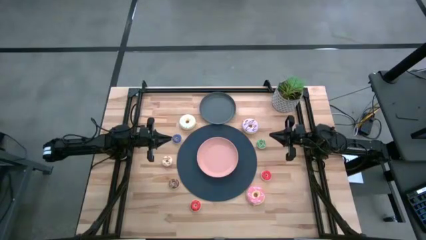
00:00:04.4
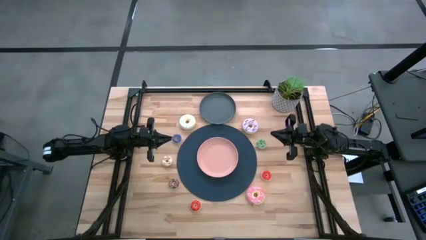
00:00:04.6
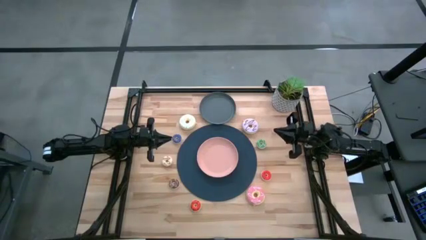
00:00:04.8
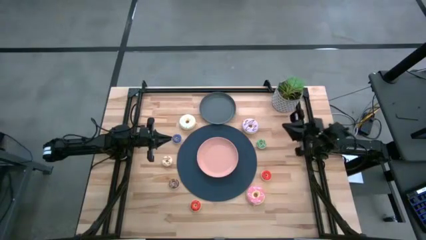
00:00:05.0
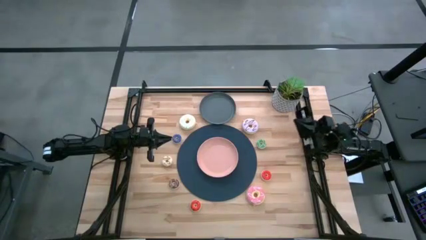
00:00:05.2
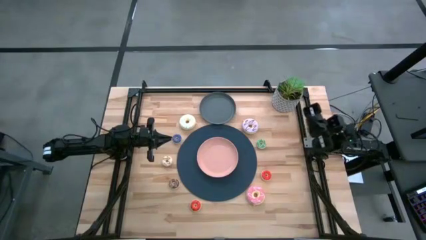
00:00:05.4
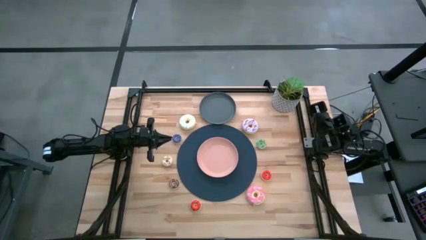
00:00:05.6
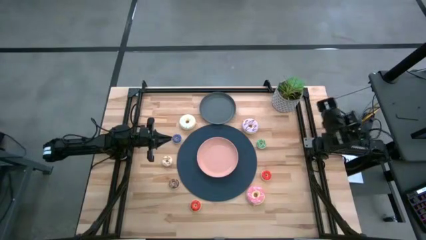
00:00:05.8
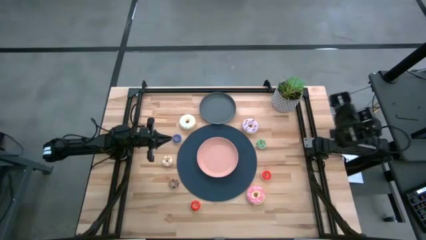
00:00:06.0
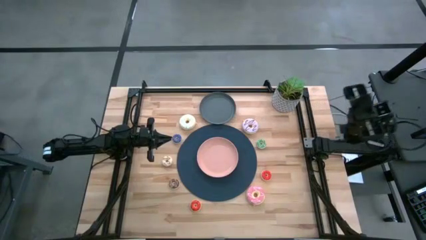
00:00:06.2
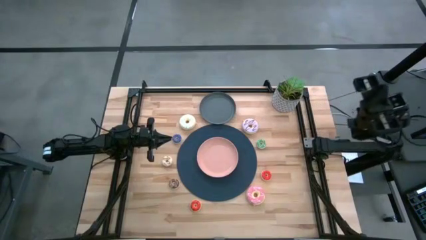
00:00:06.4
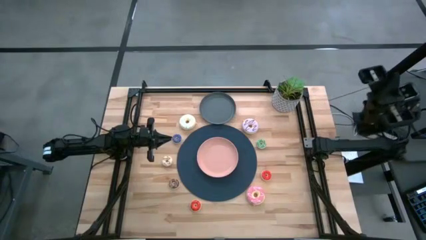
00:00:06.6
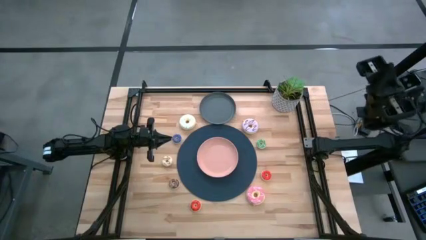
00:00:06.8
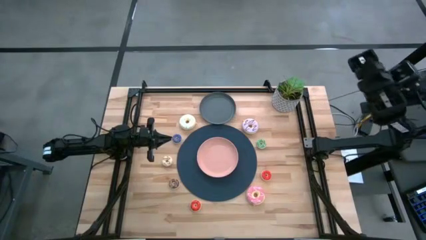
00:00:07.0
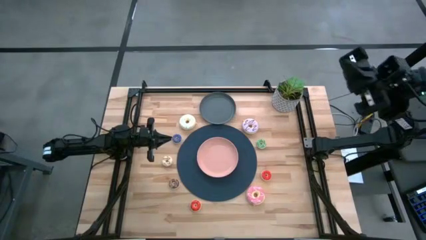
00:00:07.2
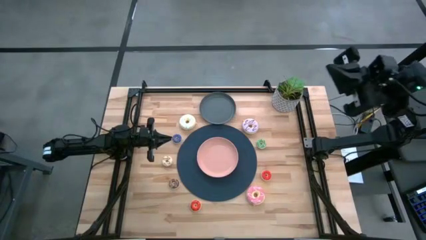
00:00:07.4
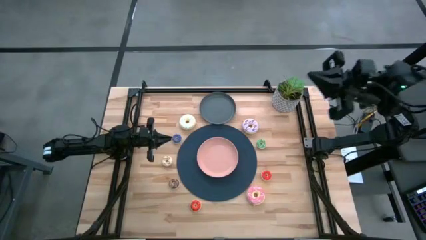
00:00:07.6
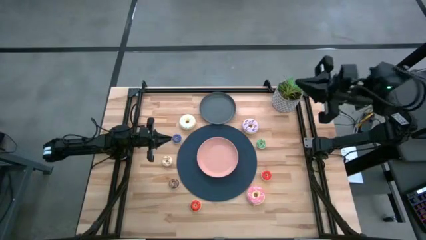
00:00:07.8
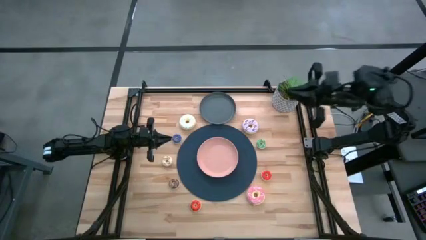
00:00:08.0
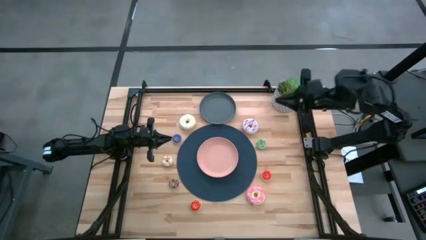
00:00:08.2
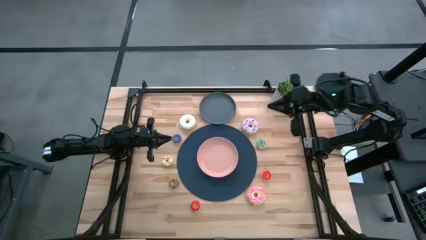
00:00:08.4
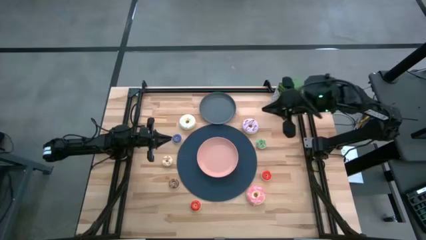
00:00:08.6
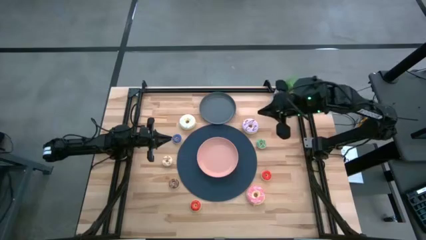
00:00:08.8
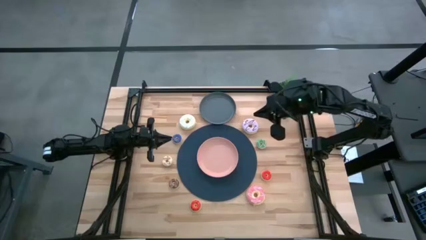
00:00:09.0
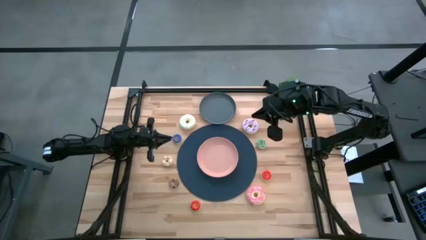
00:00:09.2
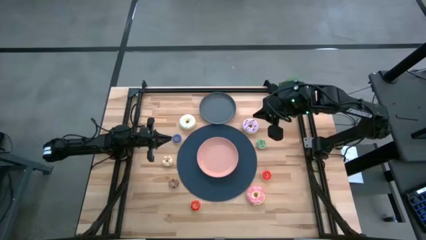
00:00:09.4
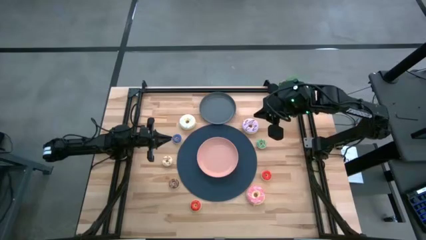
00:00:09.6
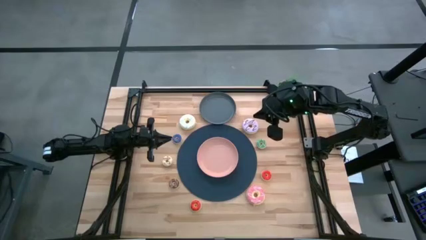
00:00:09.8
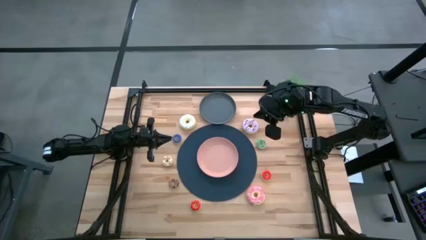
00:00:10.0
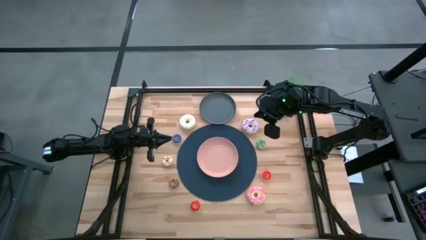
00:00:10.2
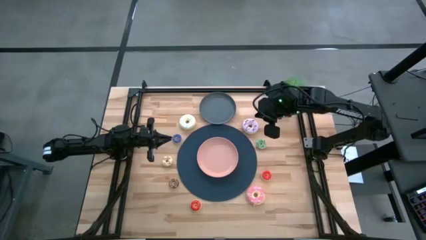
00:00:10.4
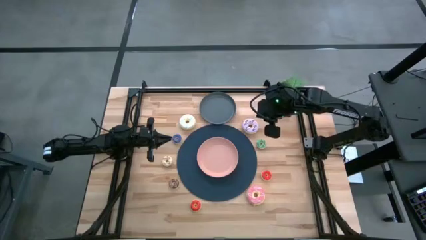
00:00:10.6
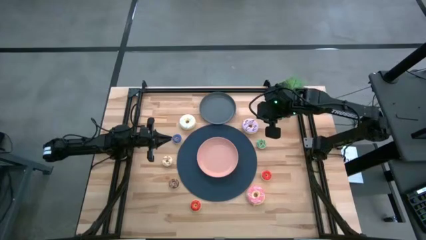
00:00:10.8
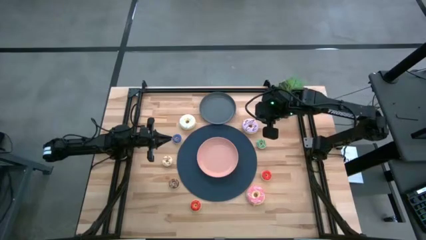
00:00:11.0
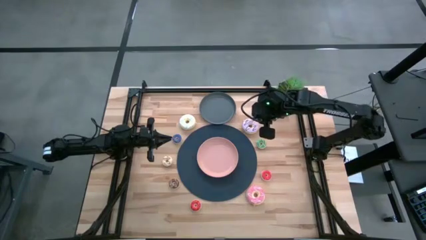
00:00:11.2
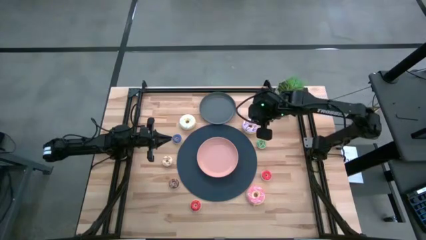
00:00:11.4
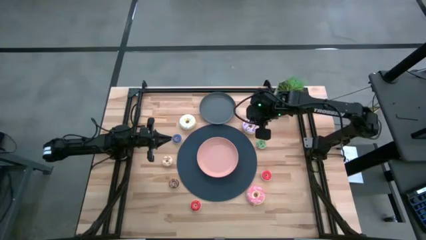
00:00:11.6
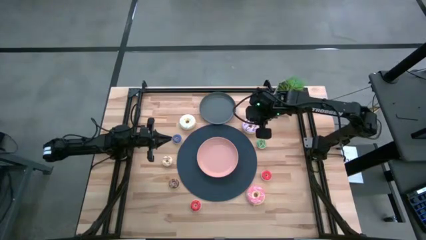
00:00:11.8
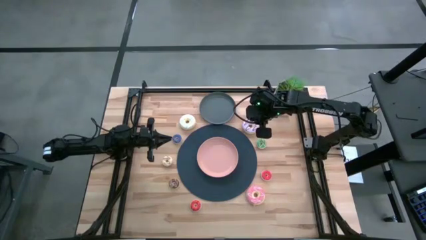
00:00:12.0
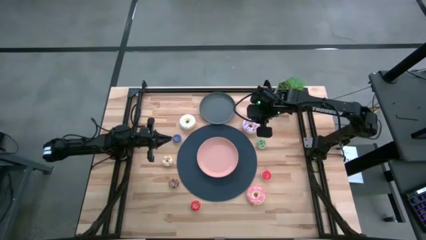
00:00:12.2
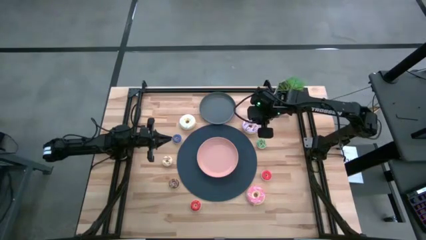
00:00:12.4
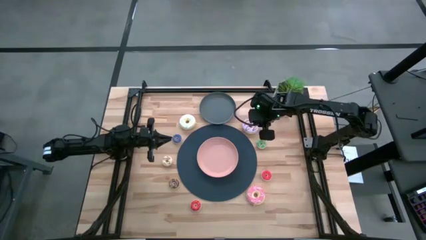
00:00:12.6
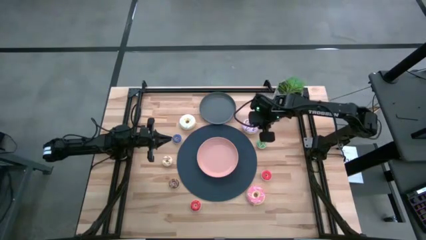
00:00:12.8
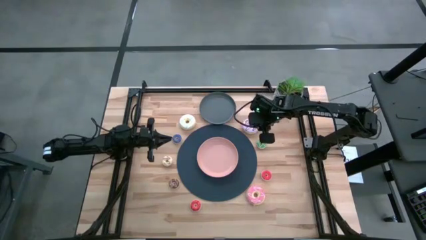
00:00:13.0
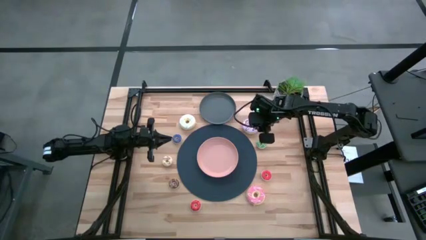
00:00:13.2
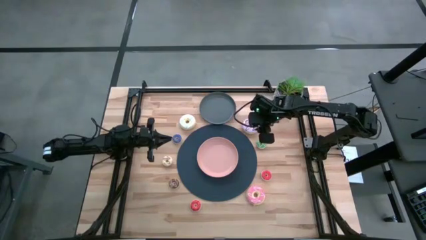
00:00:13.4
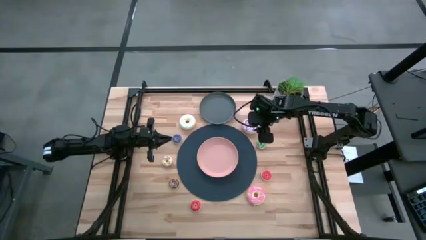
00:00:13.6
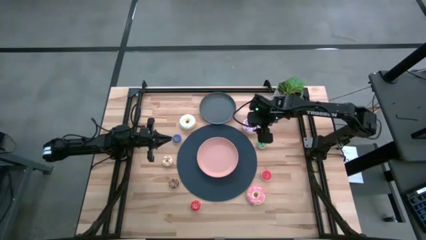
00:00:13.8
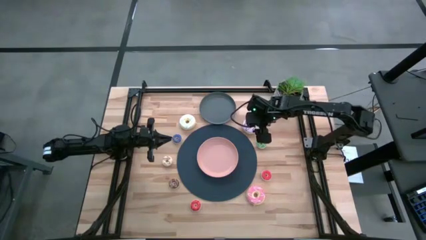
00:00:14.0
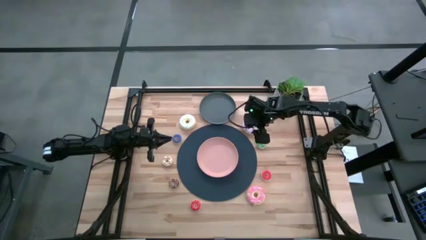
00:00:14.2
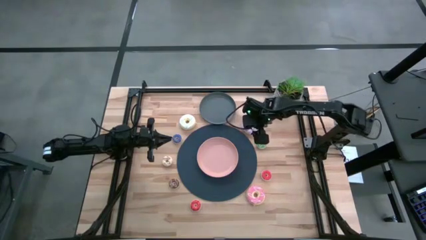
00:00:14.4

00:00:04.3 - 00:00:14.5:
Task: Pick & Place donuts
Put the large purple donut on the gray plate

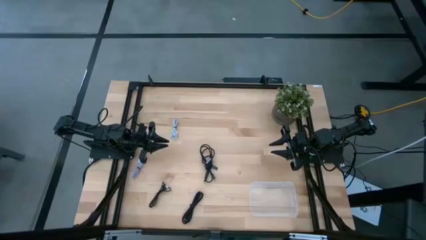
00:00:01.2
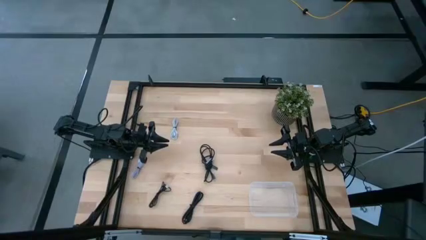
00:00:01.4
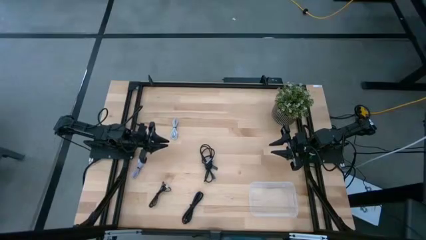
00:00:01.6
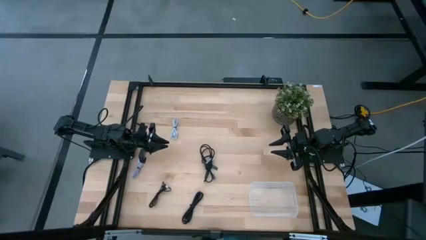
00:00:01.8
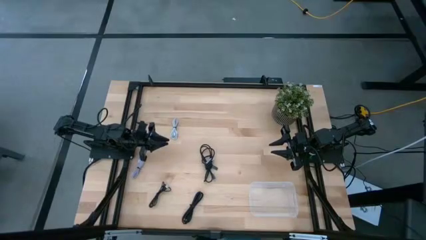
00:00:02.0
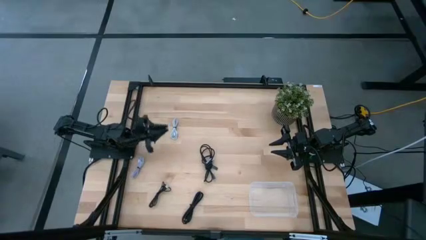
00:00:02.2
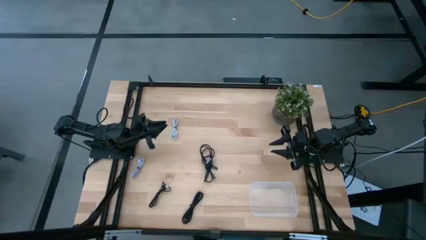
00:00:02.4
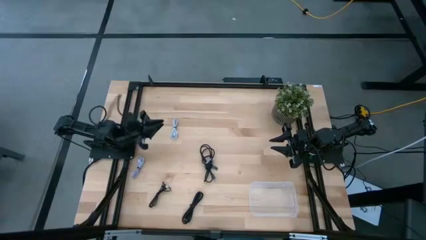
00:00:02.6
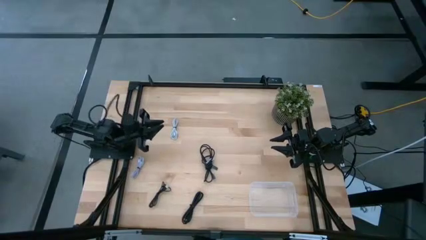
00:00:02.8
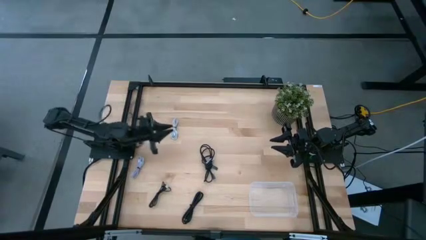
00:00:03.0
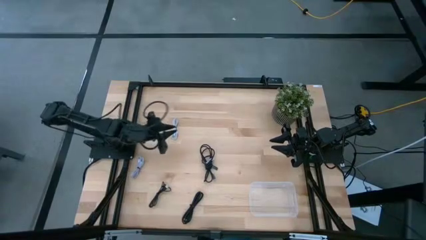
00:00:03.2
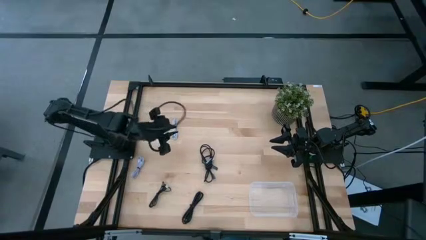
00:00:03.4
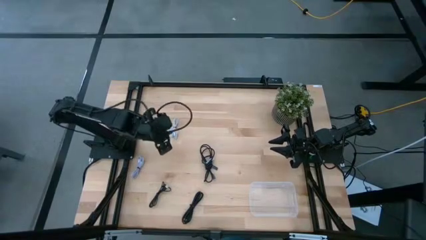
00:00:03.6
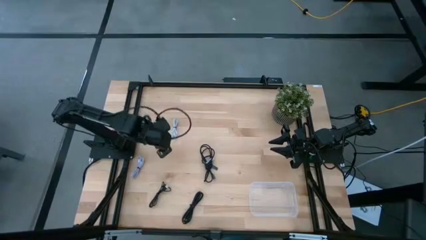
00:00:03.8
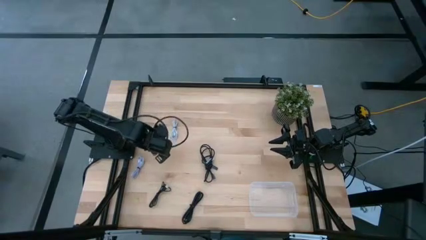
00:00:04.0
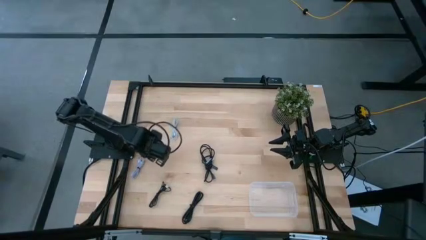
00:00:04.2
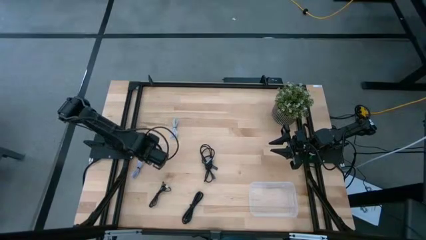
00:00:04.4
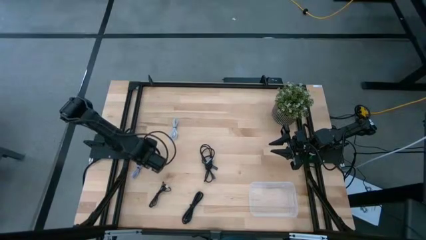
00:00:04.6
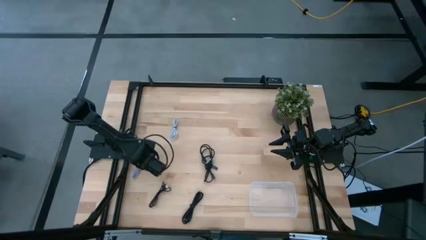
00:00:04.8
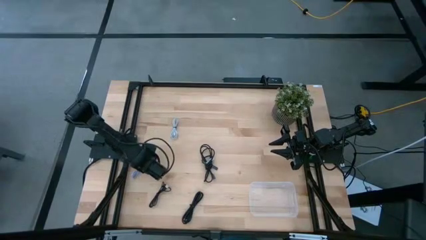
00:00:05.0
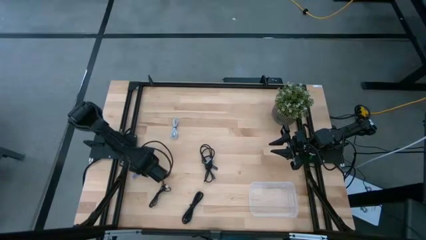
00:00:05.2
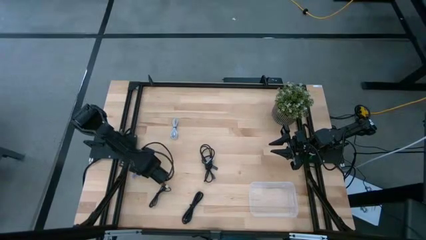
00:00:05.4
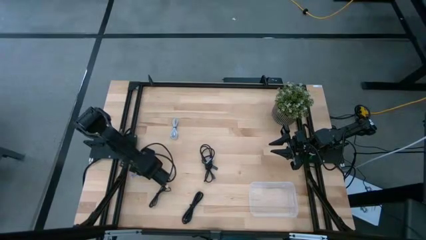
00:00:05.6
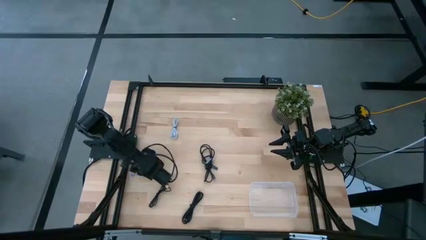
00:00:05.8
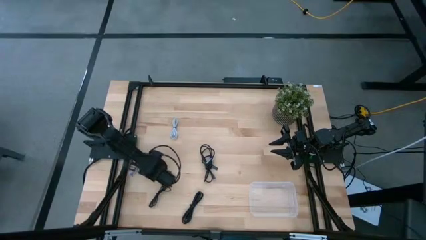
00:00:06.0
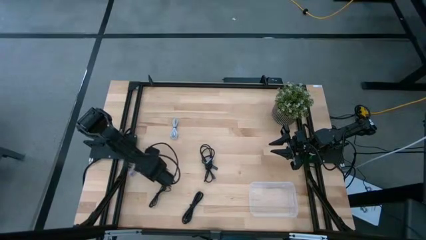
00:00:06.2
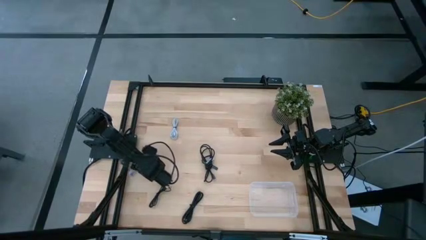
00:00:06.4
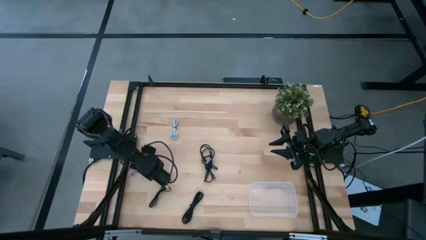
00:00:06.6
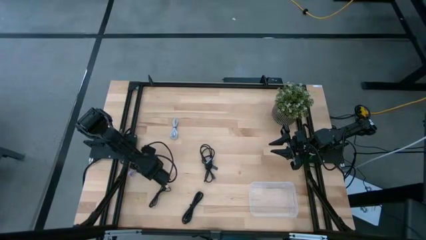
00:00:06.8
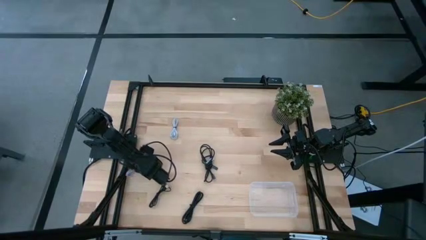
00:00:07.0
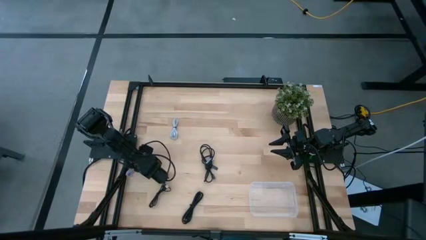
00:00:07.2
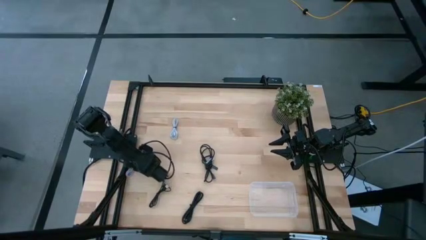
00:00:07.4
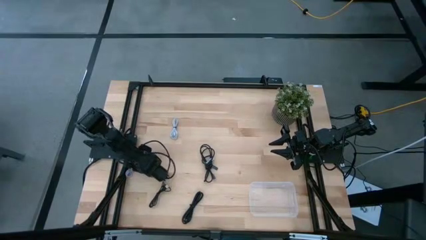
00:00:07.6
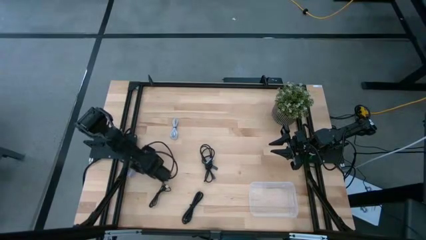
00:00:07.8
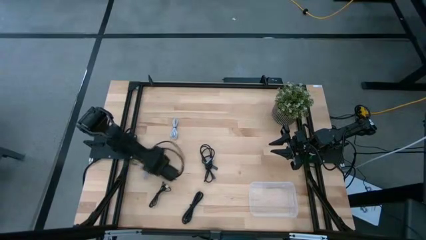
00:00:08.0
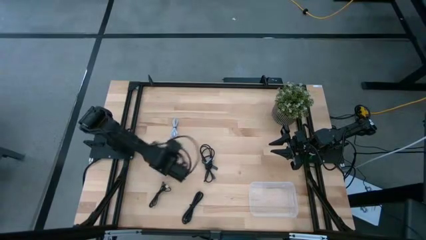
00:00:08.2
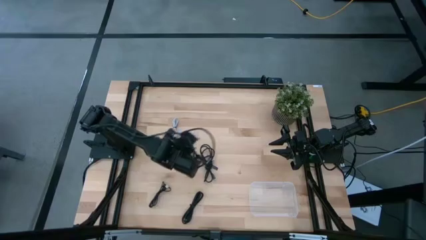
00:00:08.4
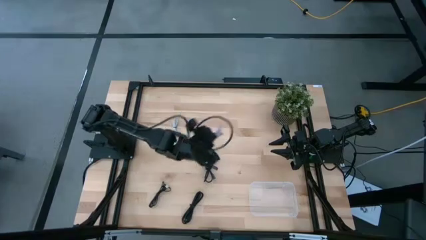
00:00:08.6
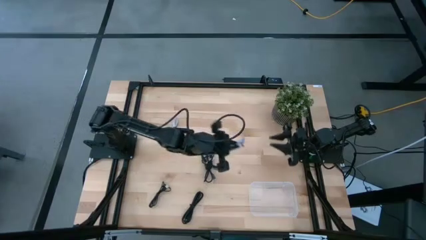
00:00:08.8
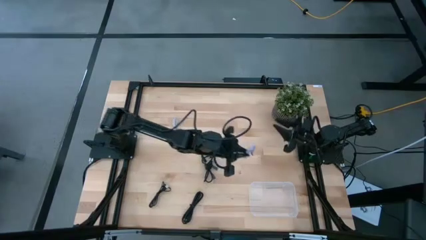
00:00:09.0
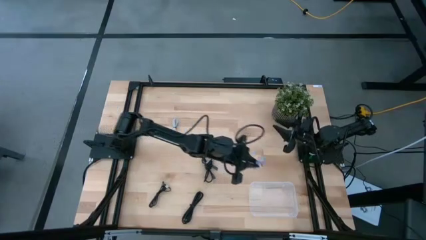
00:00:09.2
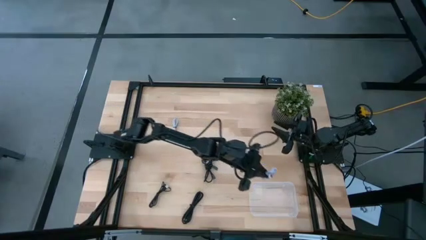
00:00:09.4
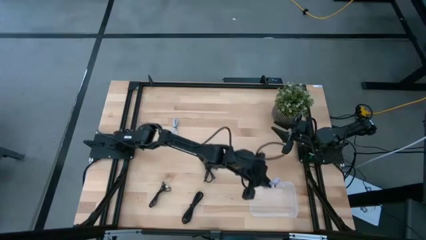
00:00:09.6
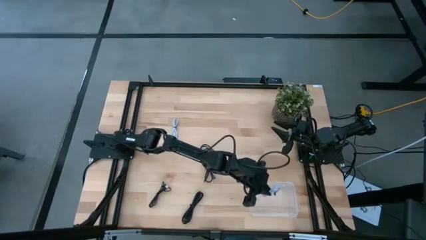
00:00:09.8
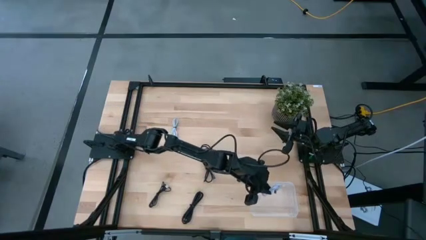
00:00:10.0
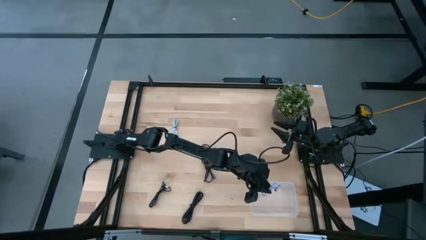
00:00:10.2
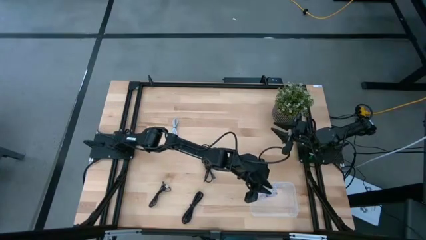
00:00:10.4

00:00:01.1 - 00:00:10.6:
Task: Pick and place USB-C Cables
Put the bottom white charger cable into the transparent bin
